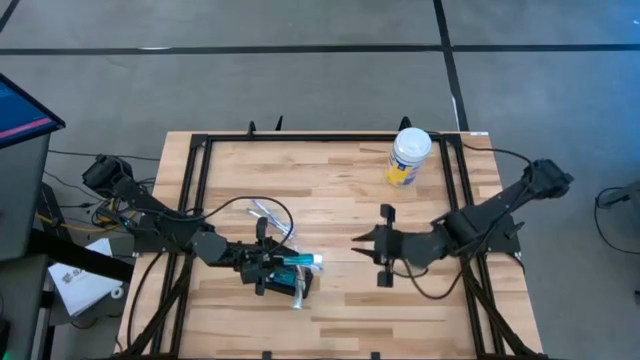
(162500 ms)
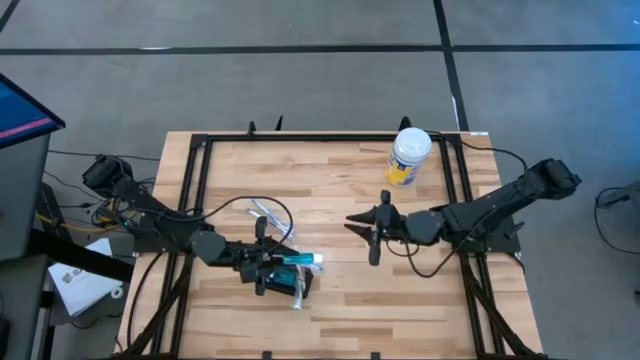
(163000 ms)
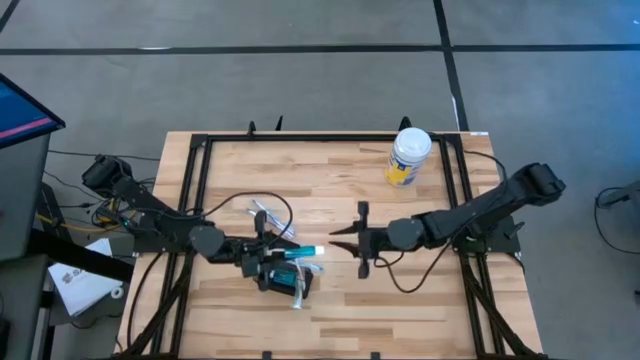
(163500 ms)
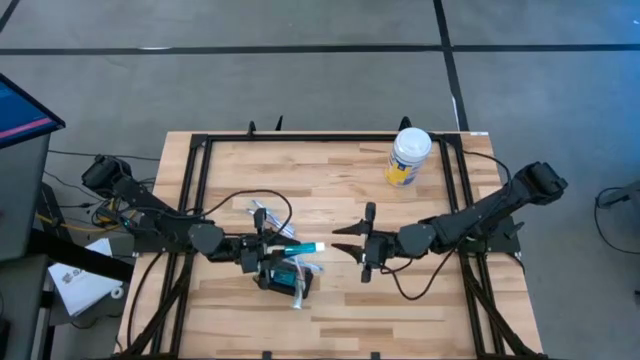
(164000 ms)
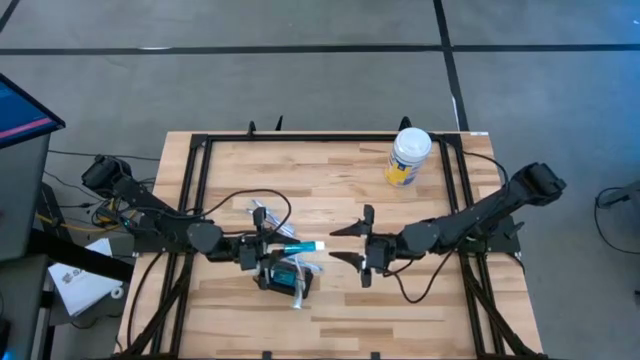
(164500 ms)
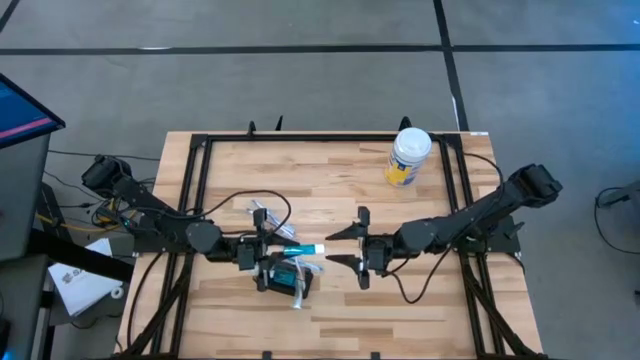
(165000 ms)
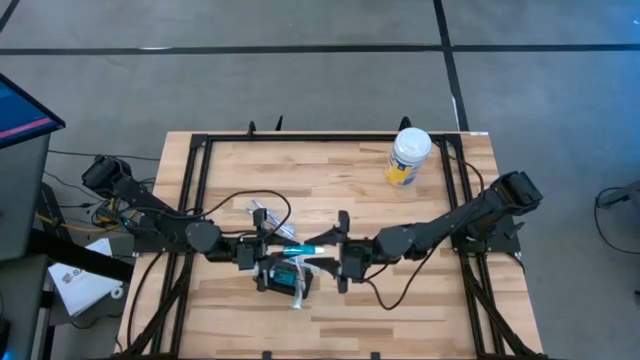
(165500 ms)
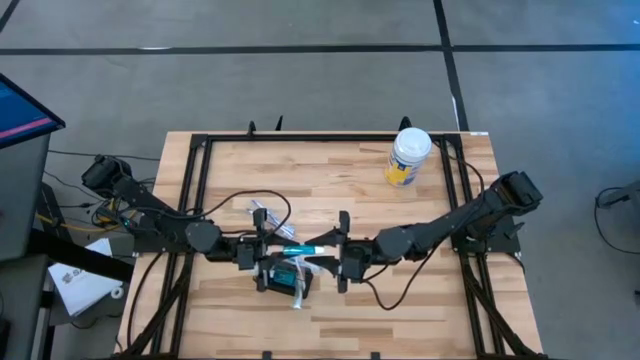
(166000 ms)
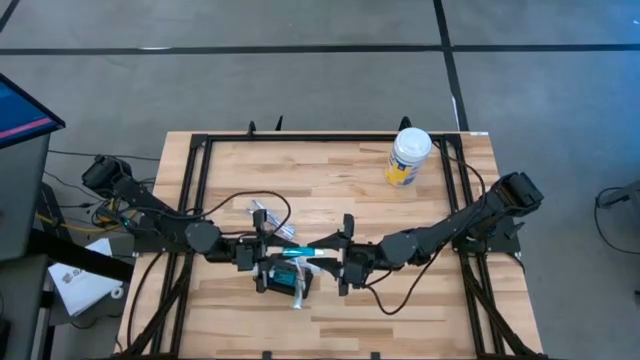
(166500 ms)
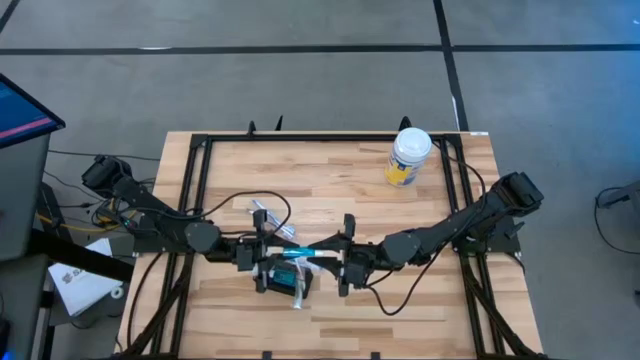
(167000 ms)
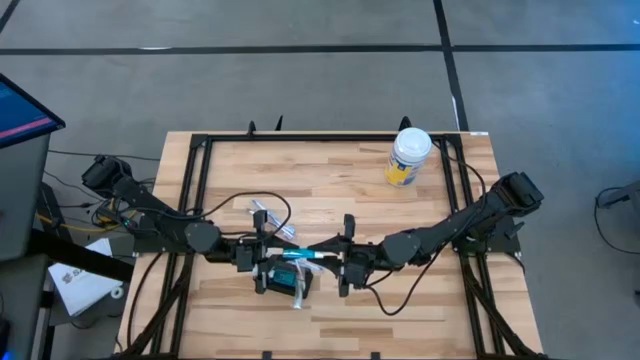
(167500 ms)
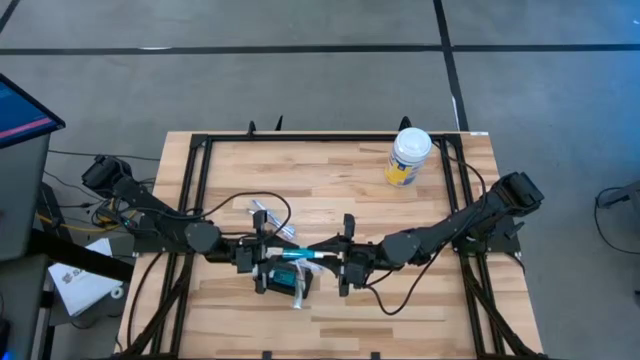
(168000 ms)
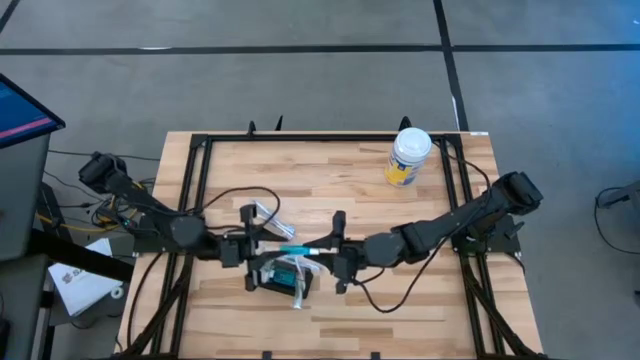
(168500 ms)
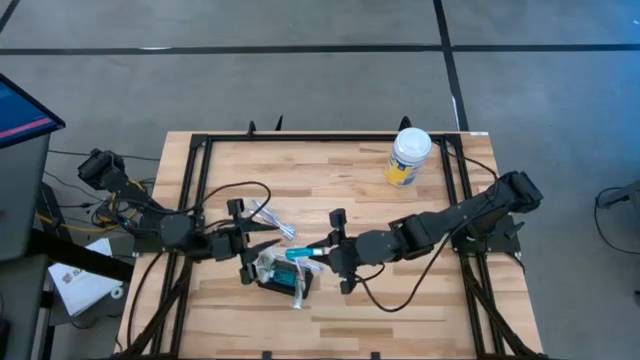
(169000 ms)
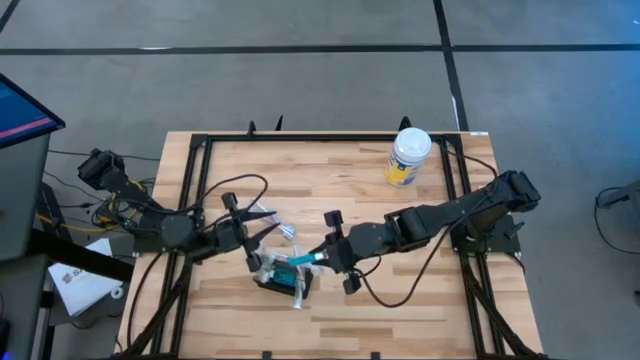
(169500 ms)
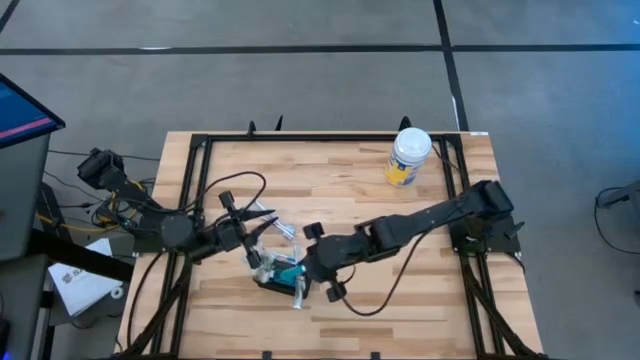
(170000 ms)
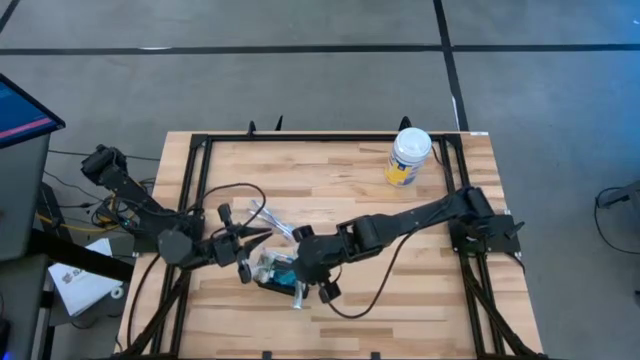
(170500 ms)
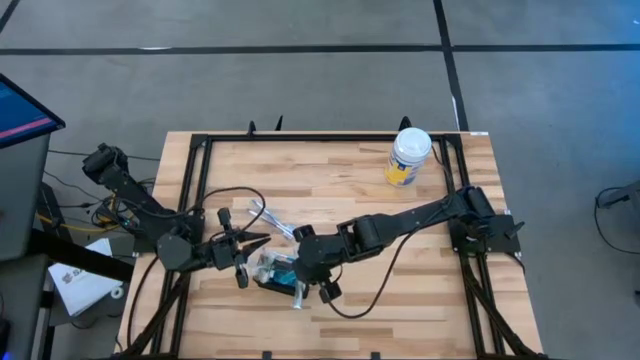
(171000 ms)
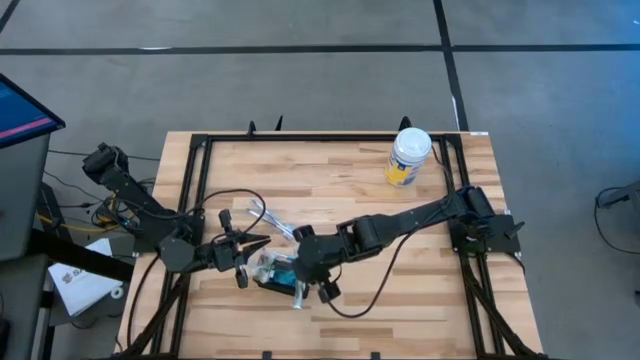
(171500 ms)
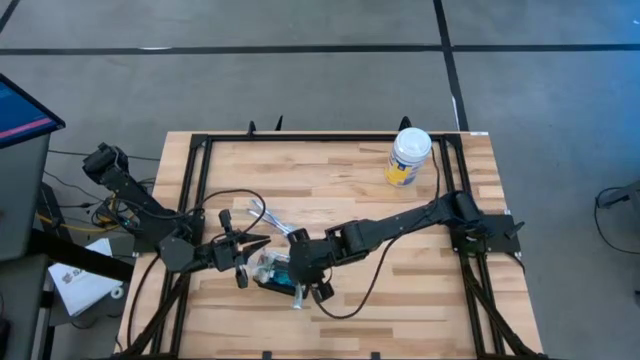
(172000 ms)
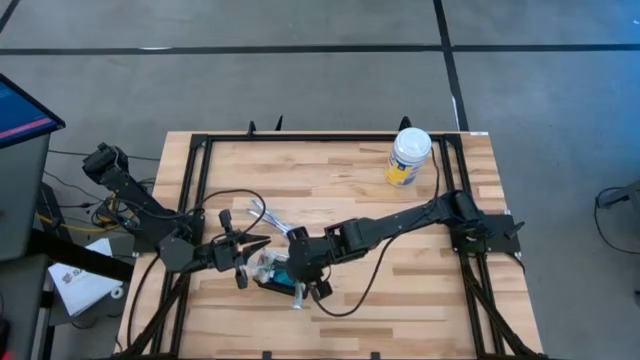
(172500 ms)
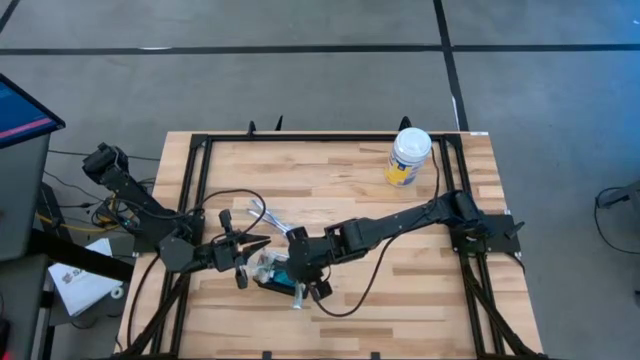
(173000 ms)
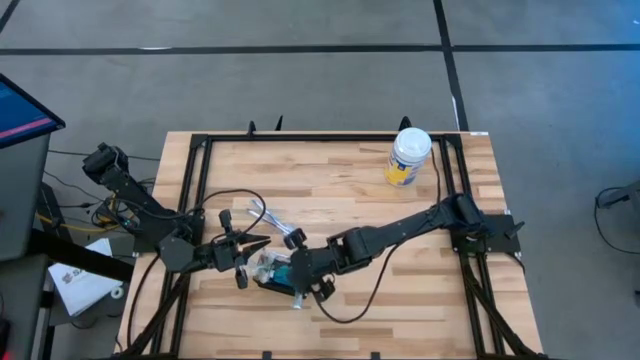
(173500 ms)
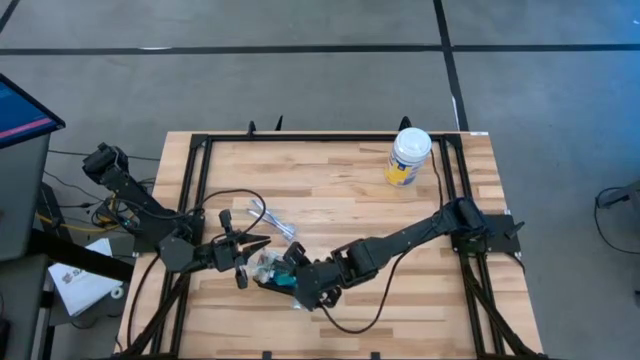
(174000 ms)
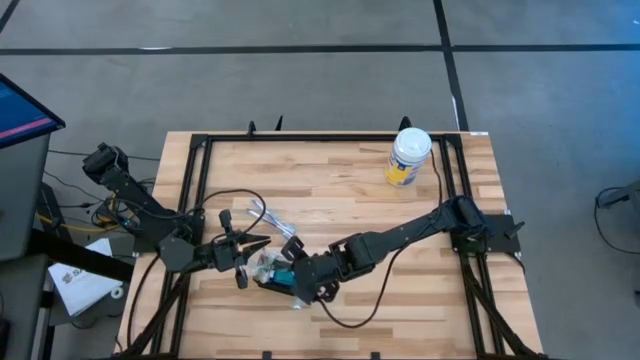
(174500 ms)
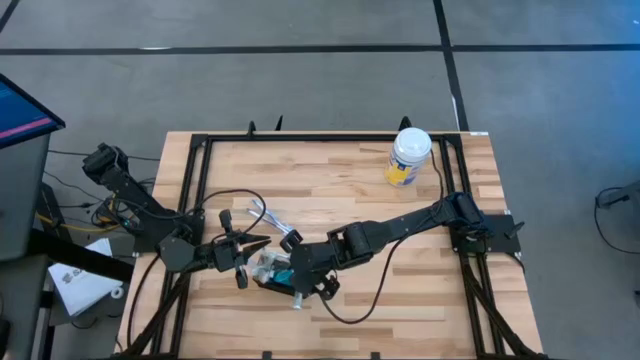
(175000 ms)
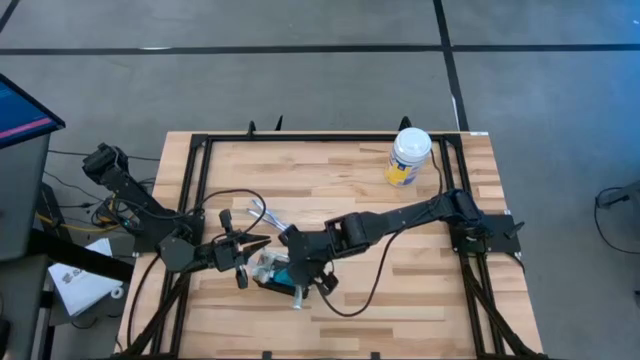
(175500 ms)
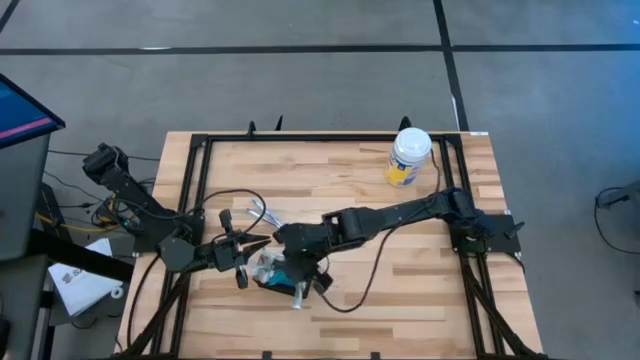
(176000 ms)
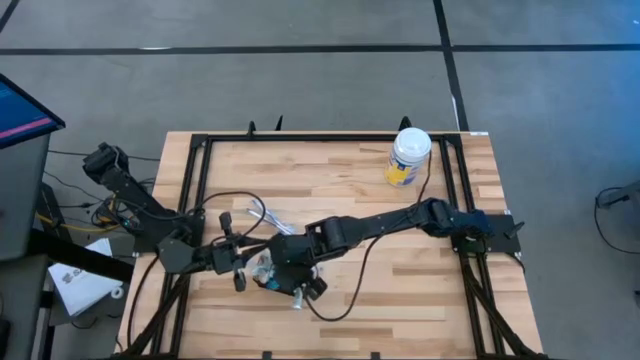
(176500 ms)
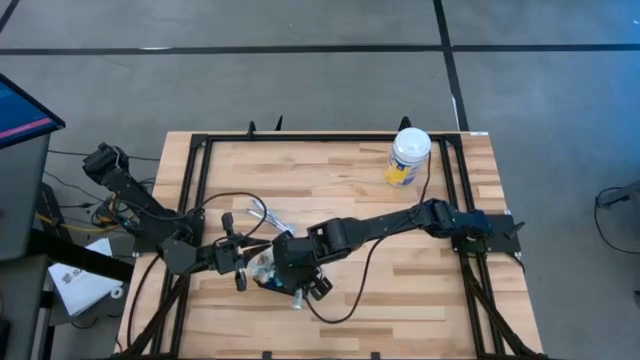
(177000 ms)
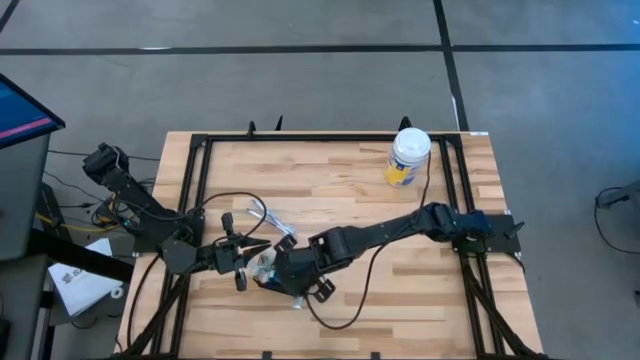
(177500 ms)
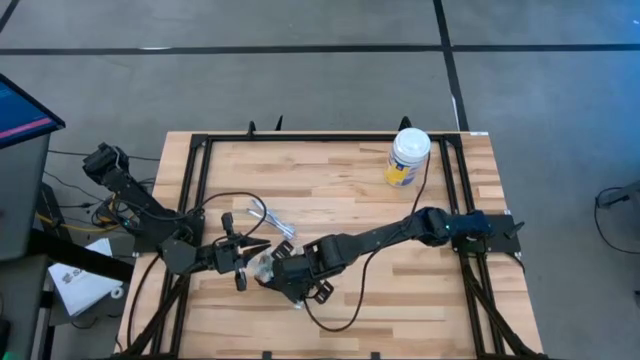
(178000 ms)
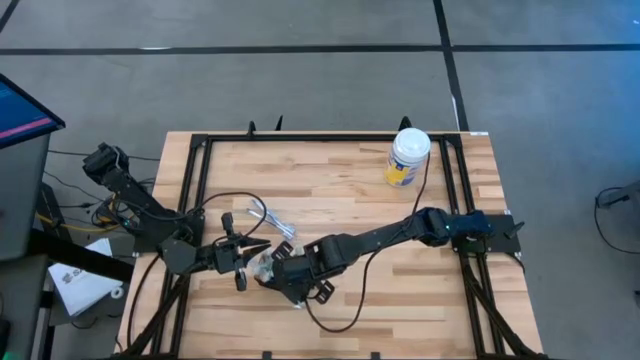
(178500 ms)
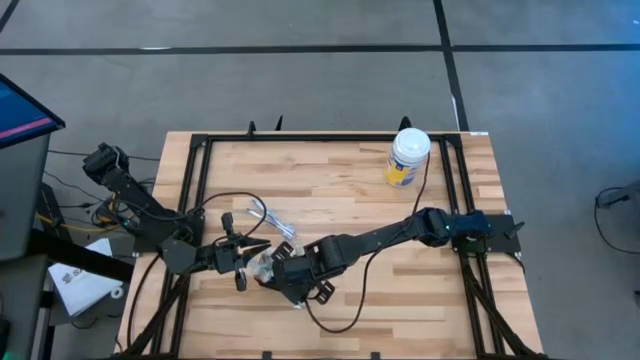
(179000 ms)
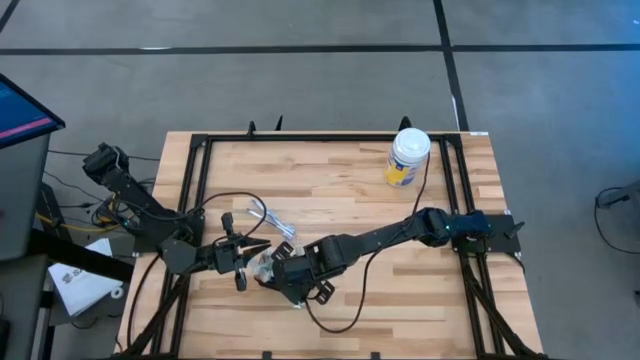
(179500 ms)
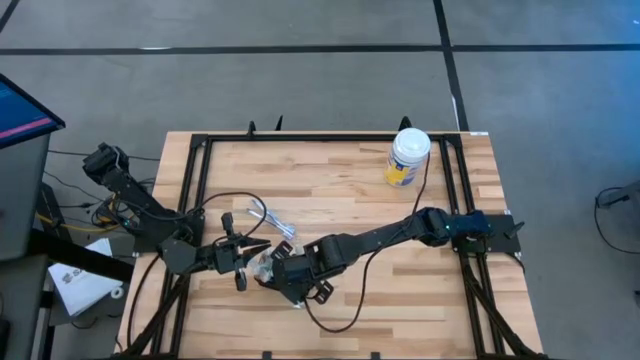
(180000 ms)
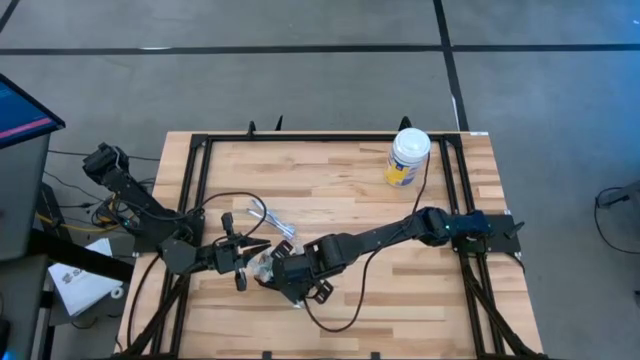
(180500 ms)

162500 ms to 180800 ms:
Task: Pick & Place toothbrushing station
Put the mouthwash into the mesh organizer
